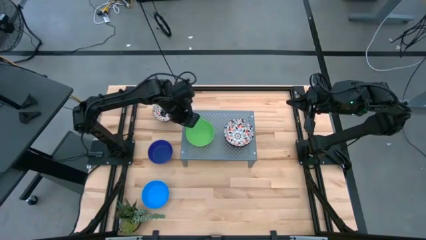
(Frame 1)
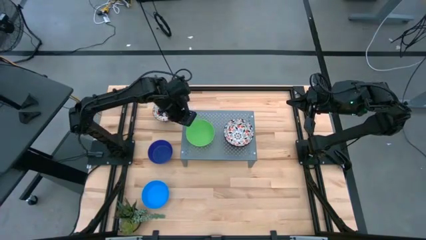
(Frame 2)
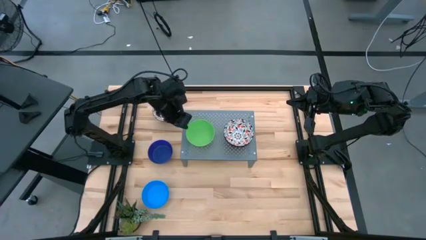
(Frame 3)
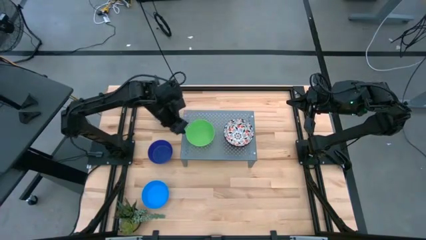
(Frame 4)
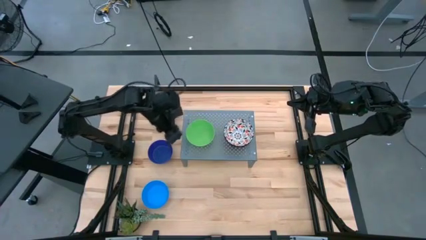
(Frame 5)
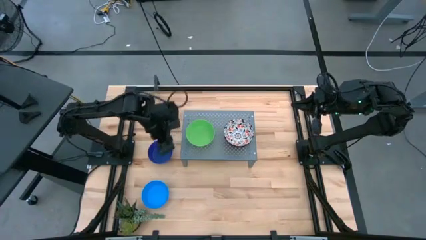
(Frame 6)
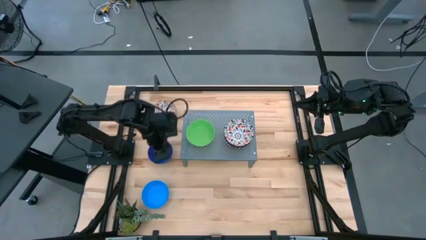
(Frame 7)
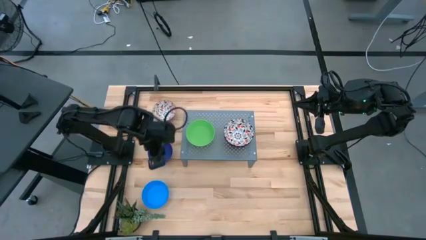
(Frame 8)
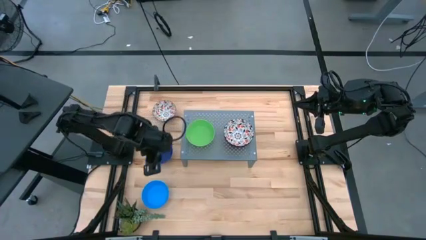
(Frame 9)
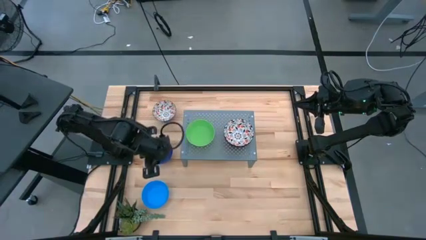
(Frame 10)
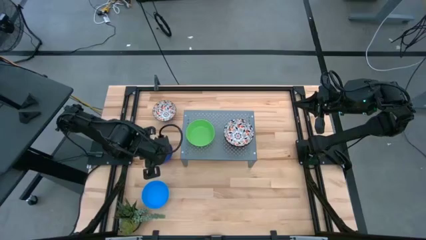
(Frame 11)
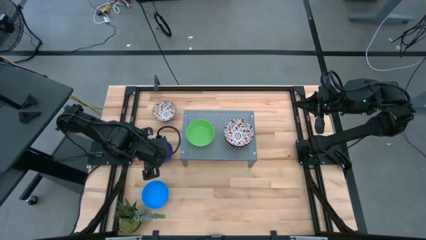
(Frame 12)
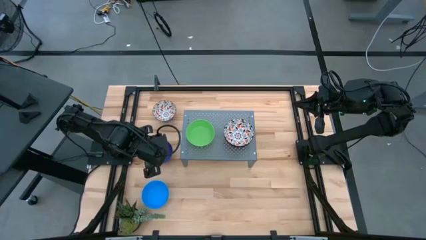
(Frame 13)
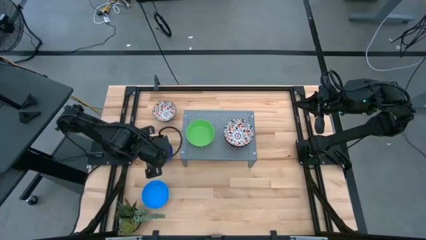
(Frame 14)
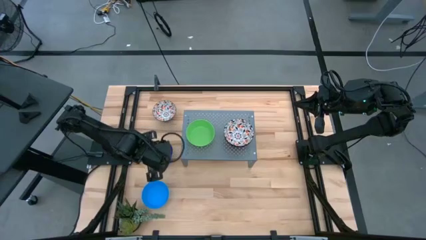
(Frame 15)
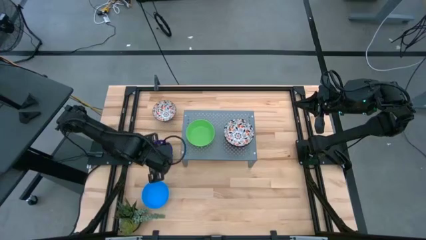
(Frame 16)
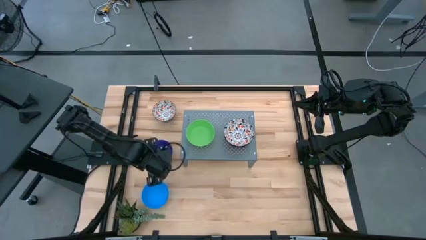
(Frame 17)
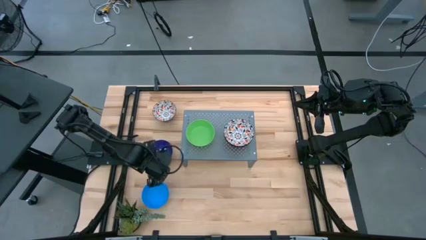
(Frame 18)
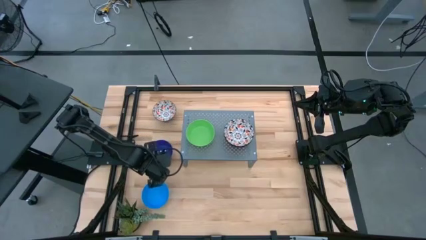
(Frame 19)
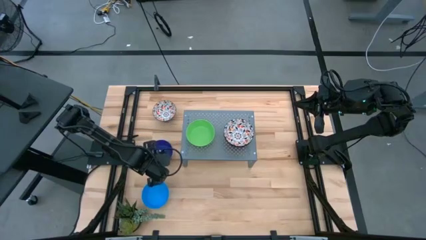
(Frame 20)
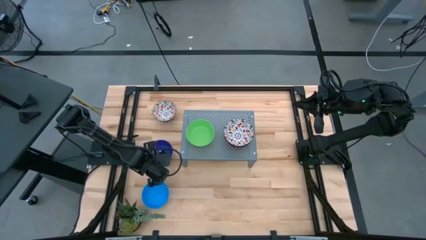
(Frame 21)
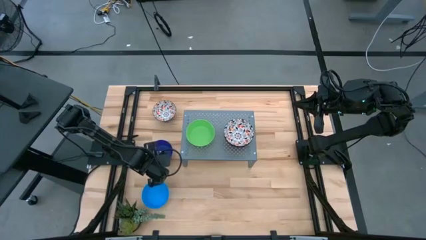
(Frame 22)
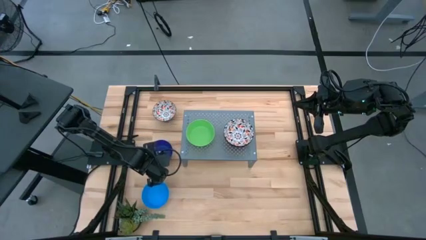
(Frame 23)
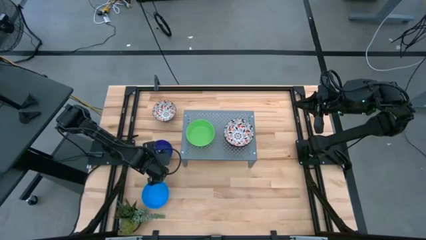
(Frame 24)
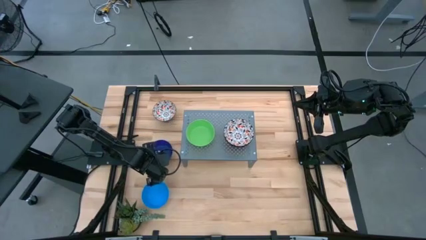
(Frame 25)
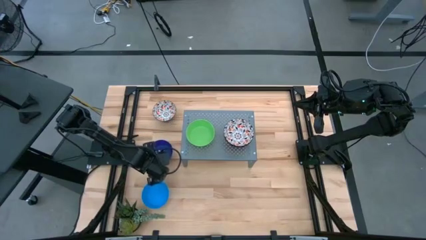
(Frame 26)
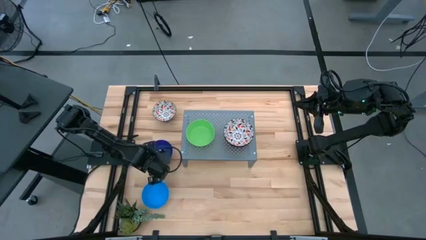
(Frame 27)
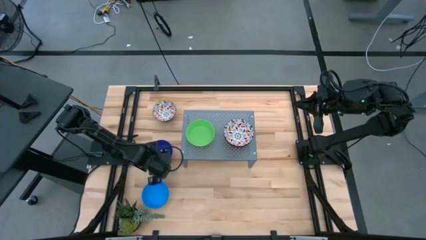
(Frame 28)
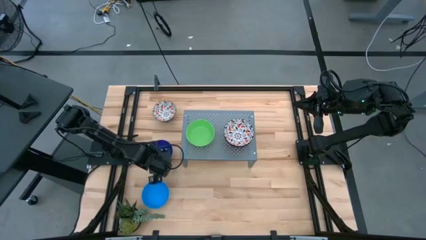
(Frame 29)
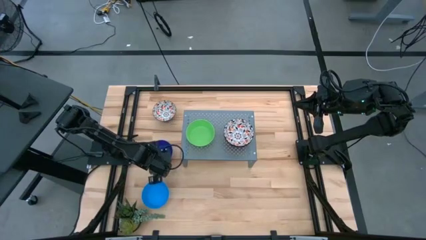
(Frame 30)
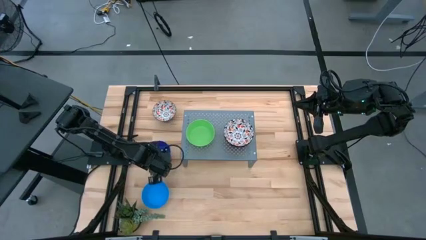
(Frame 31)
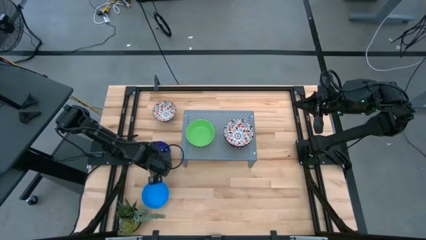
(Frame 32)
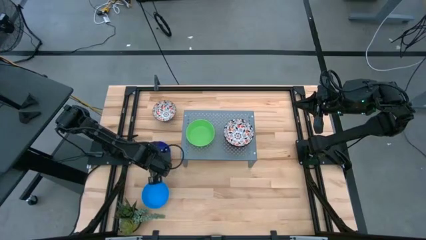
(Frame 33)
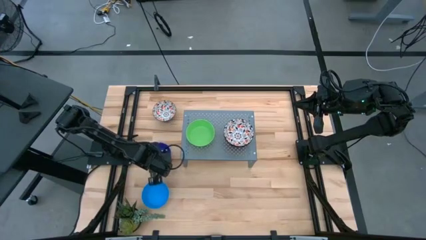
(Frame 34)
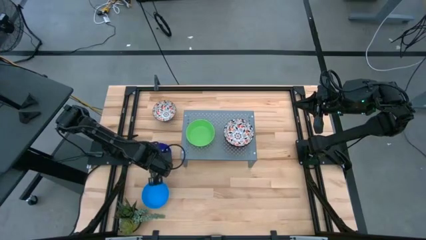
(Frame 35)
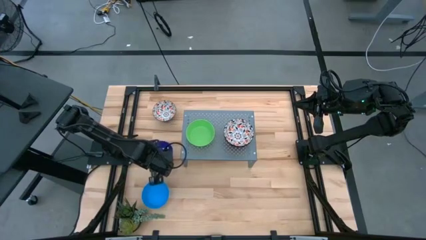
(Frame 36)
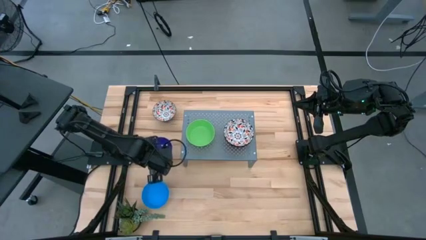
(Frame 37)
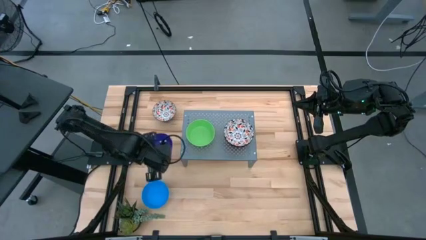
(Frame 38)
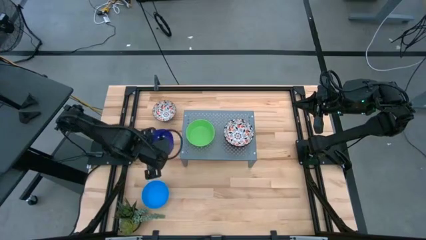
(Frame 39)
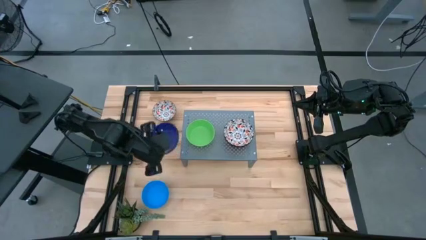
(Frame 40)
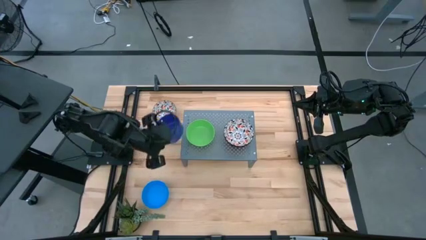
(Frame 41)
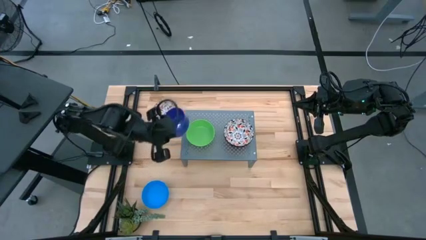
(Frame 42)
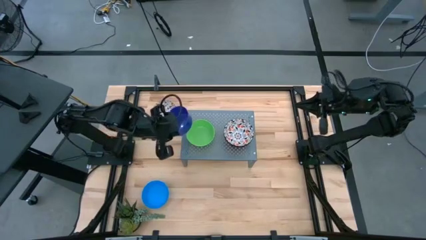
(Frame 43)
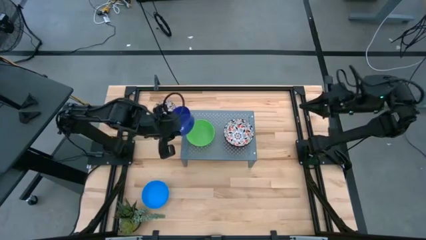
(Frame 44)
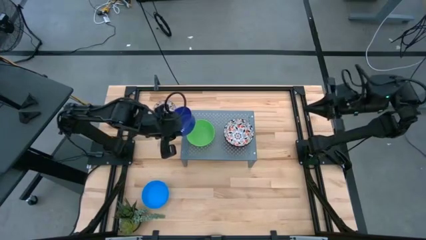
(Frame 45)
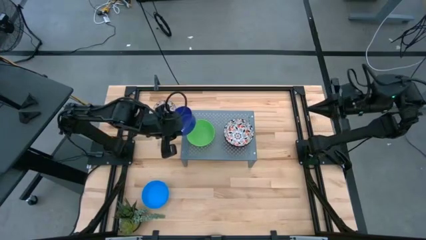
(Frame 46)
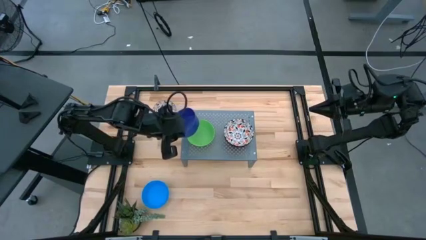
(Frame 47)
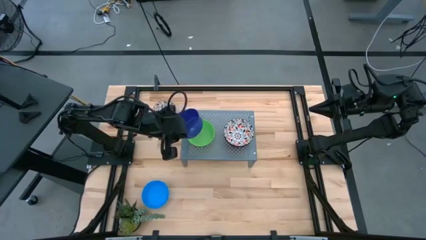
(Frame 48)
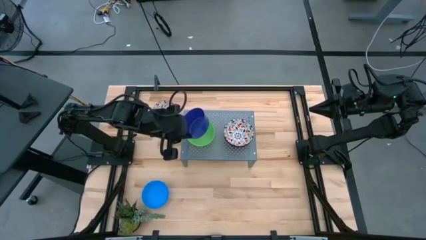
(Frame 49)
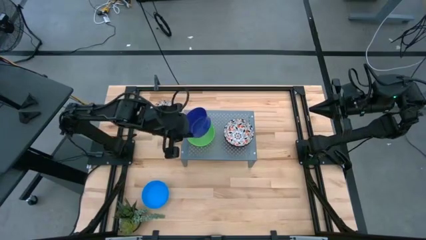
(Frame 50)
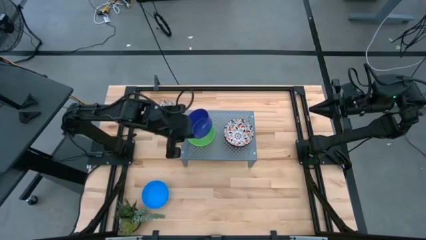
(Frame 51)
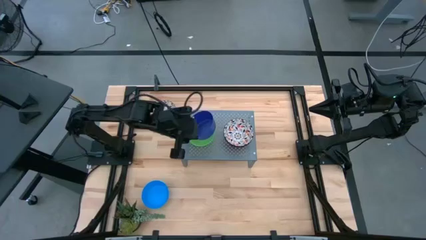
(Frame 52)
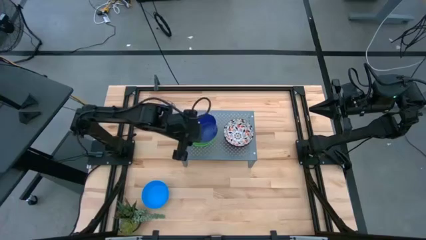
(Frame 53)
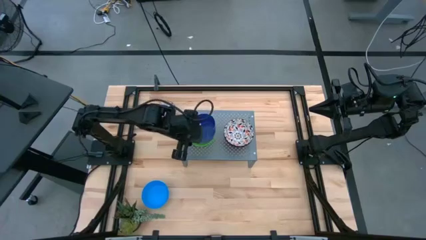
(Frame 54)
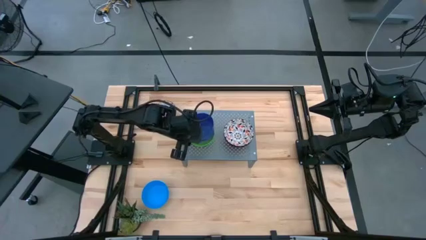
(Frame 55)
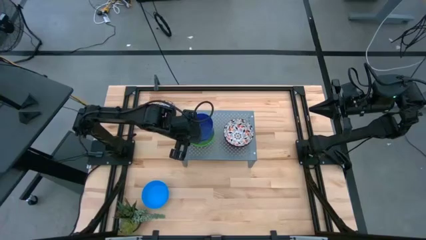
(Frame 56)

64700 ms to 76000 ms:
Task: Pick & Place Mini bowls
Stack the blue bowl on top of the green bowl on the shelf

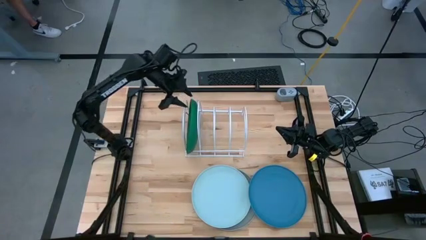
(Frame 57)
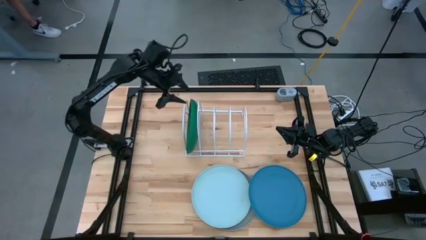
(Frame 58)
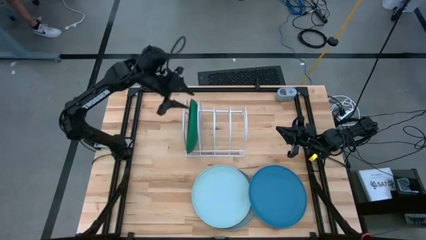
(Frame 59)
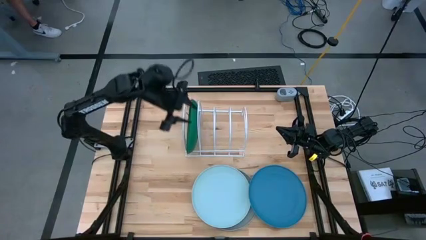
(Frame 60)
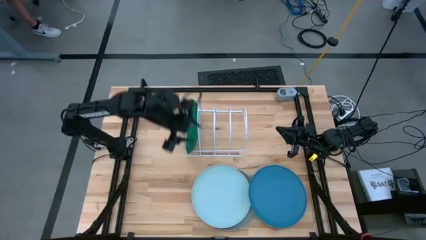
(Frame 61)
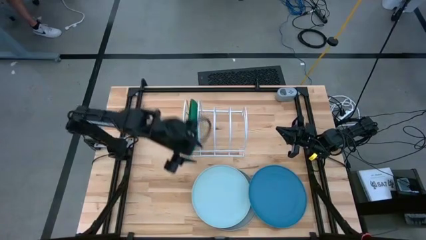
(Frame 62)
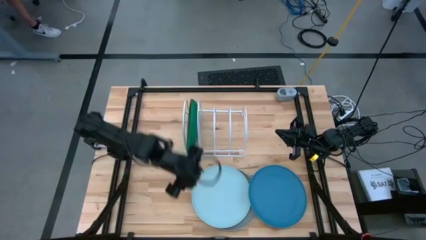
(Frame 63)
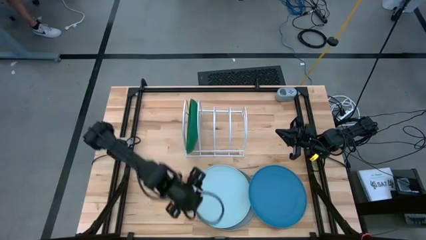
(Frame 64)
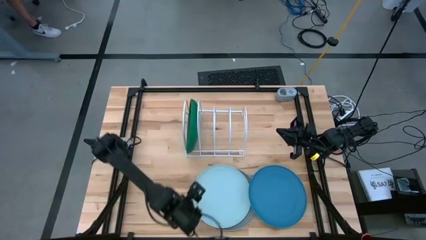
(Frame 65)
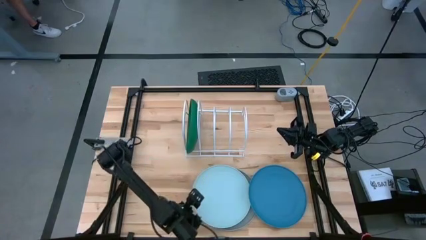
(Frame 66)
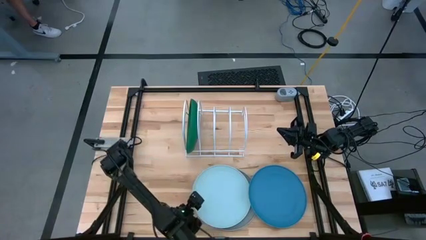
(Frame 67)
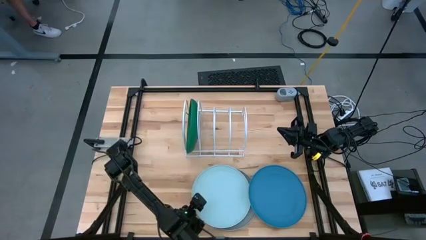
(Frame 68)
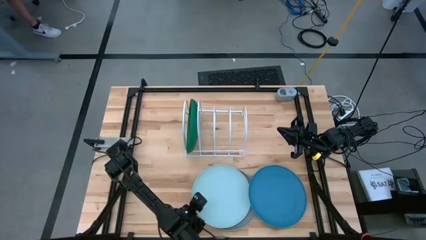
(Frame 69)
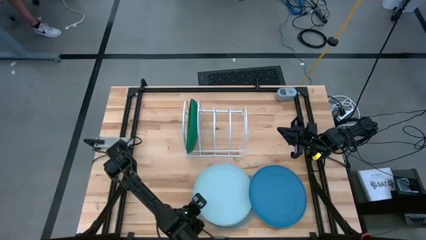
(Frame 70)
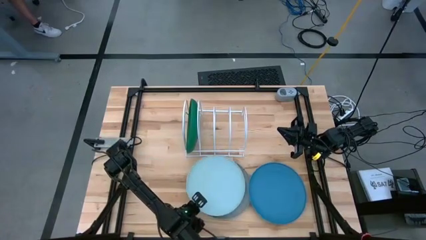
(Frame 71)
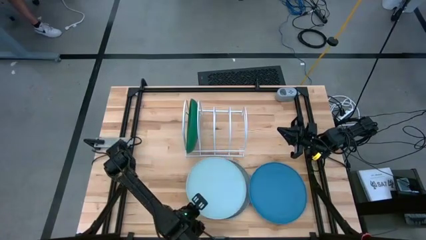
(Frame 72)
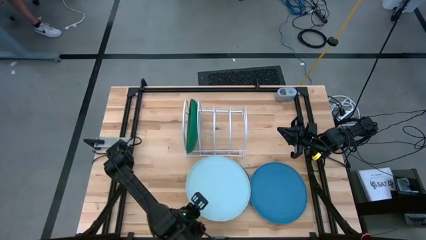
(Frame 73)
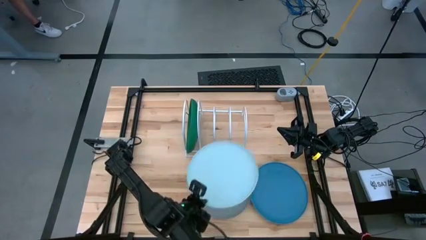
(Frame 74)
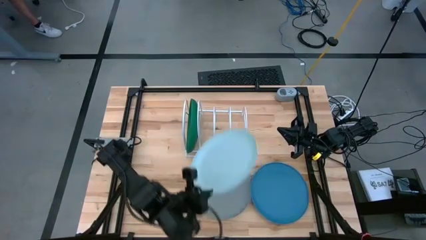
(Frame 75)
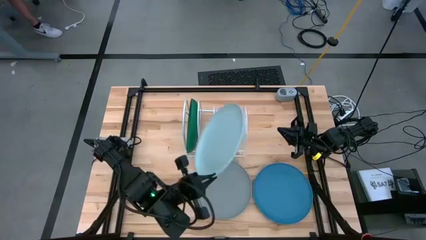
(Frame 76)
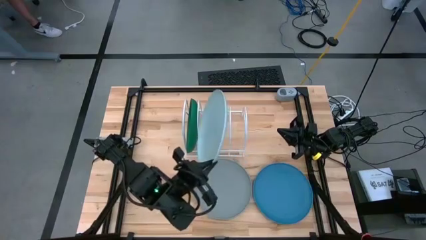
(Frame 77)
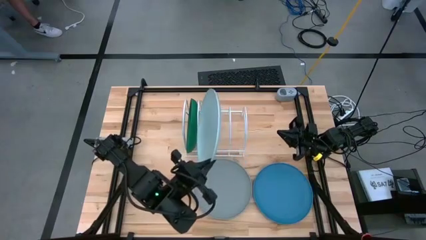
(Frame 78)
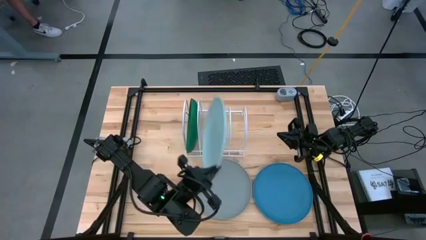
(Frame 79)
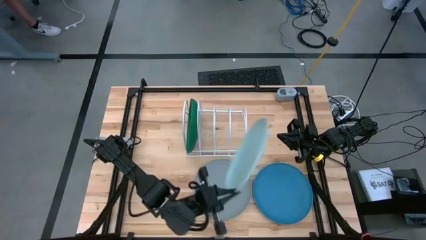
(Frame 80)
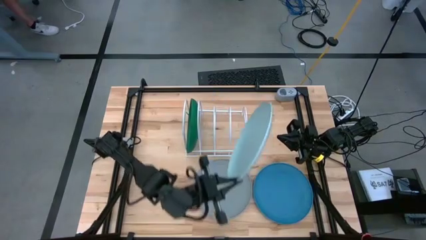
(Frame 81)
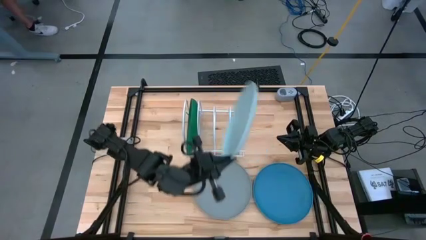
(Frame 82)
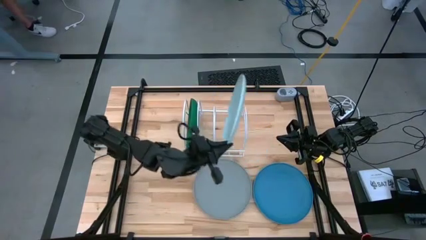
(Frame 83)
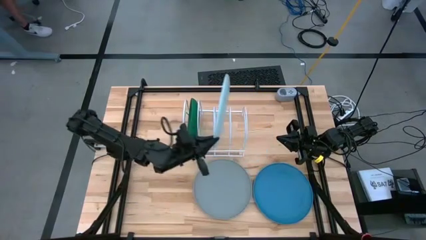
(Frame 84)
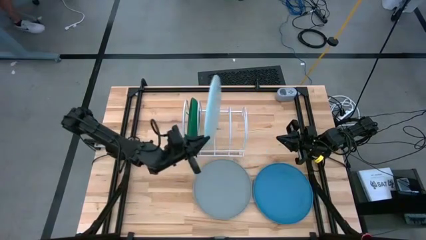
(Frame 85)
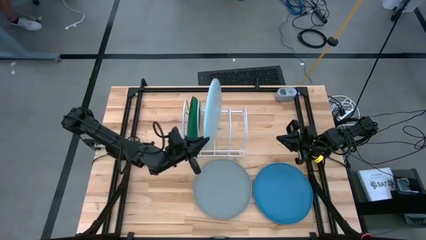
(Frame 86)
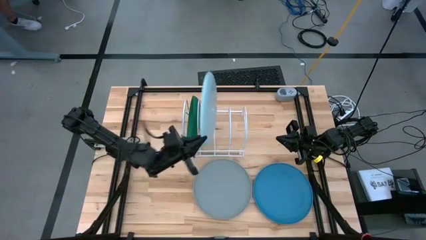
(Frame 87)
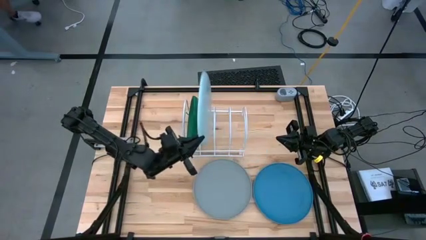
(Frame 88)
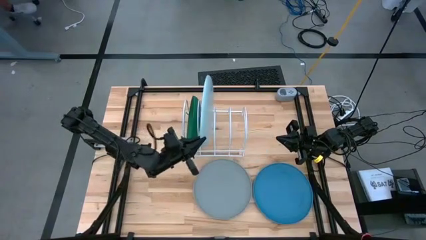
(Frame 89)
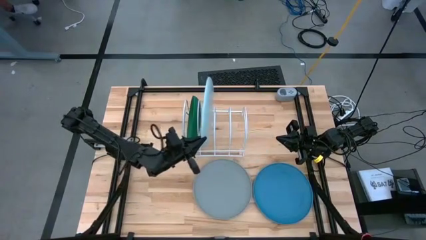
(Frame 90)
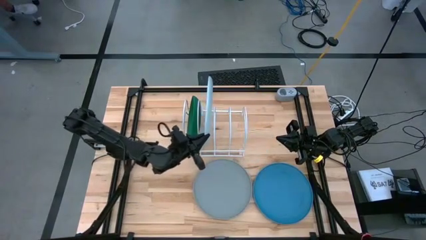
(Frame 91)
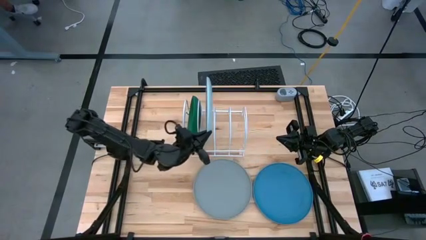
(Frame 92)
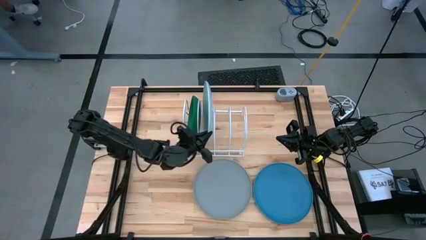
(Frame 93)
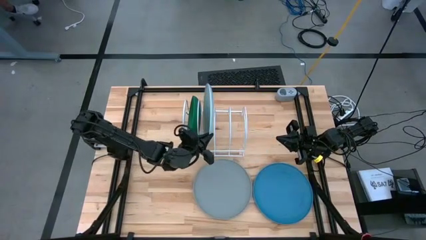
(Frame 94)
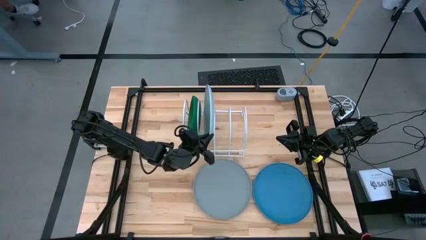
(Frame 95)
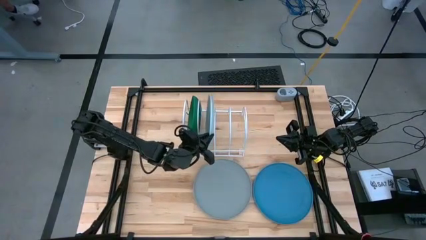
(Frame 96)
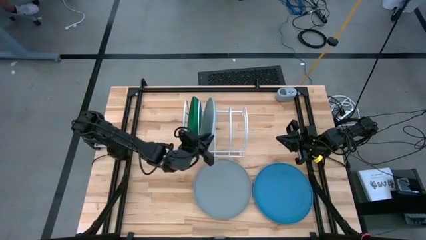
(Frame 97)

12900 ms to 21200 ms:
Task: Sort dishes
Put the light blue plate in the dish rack
